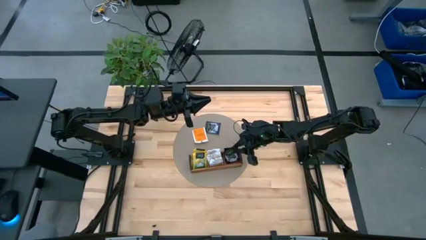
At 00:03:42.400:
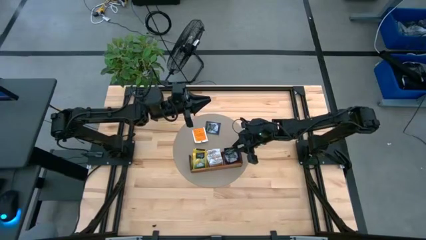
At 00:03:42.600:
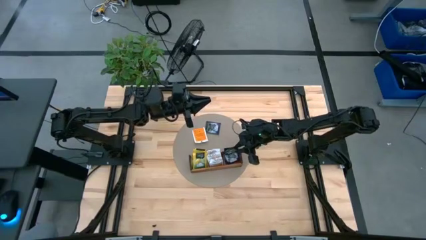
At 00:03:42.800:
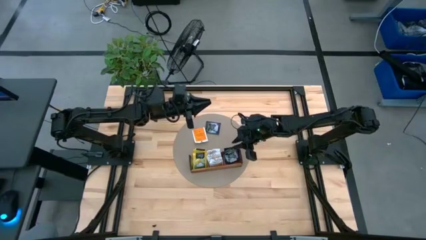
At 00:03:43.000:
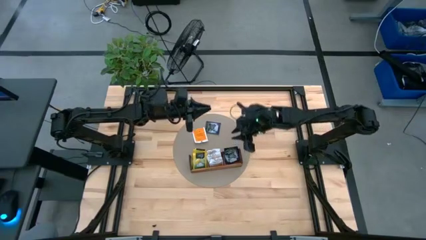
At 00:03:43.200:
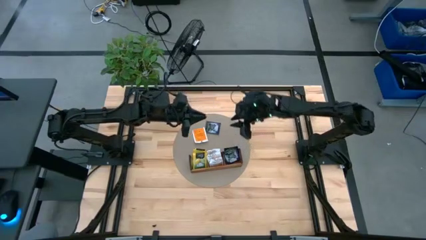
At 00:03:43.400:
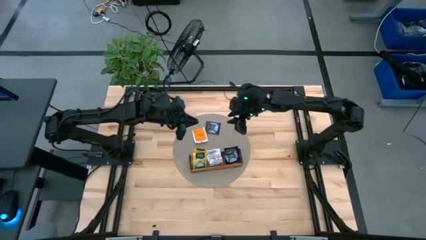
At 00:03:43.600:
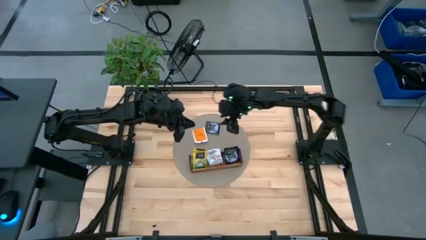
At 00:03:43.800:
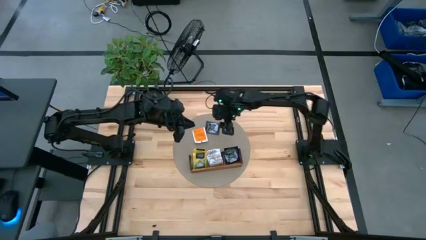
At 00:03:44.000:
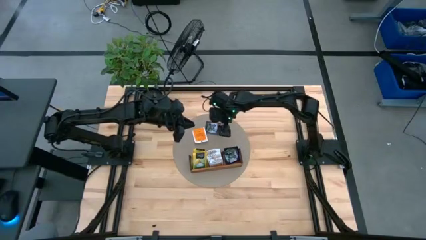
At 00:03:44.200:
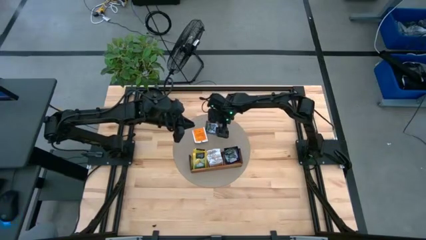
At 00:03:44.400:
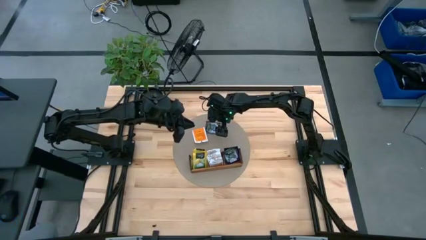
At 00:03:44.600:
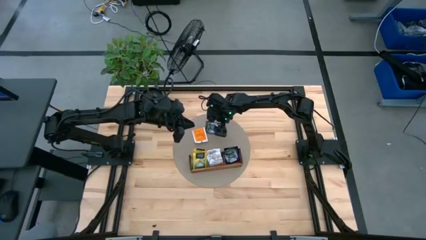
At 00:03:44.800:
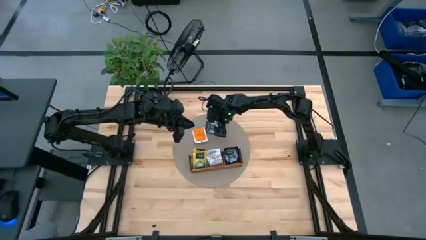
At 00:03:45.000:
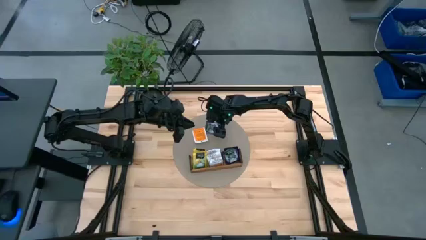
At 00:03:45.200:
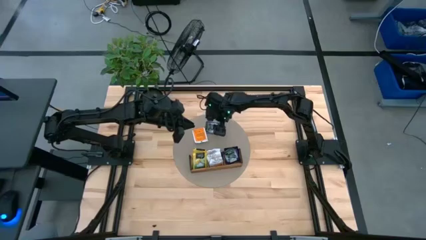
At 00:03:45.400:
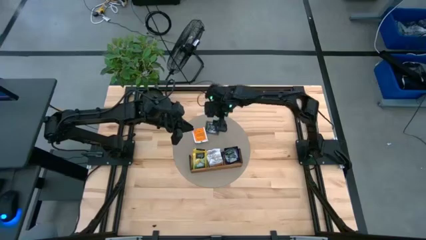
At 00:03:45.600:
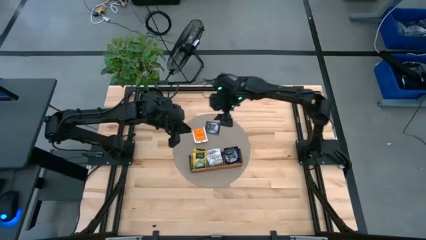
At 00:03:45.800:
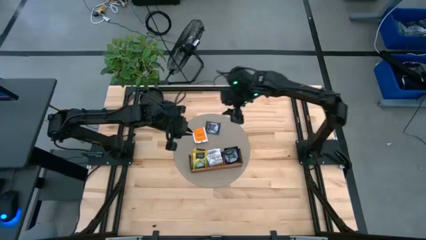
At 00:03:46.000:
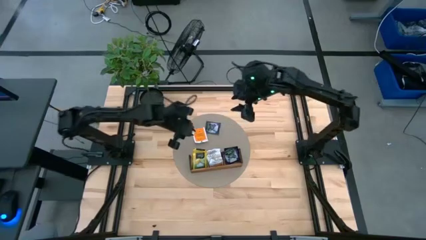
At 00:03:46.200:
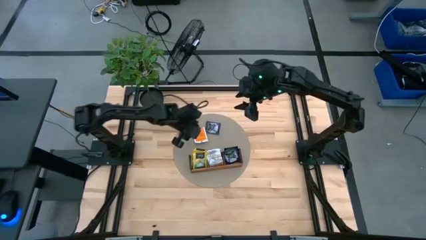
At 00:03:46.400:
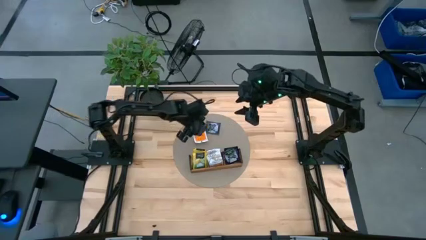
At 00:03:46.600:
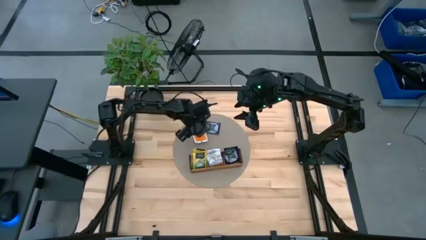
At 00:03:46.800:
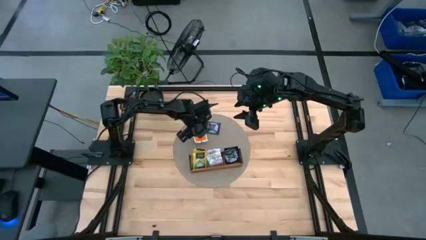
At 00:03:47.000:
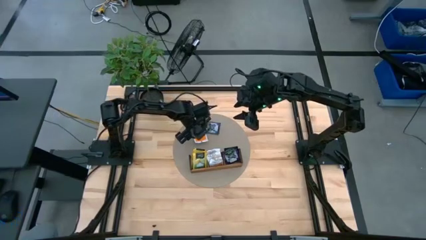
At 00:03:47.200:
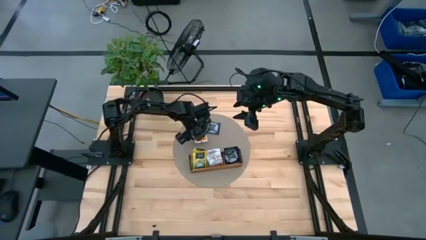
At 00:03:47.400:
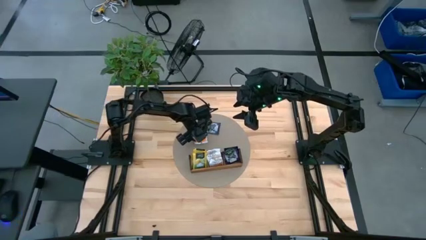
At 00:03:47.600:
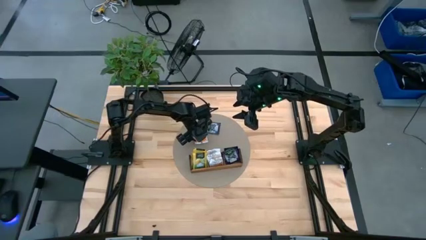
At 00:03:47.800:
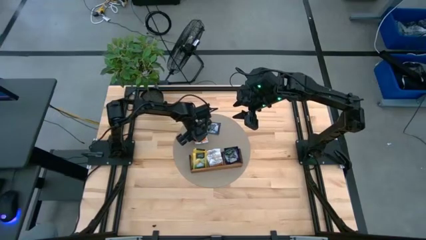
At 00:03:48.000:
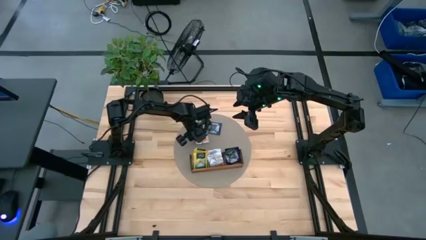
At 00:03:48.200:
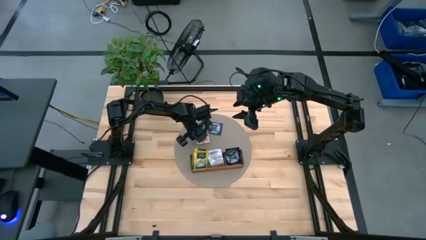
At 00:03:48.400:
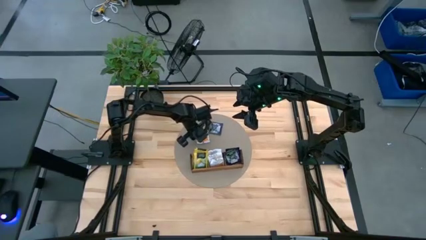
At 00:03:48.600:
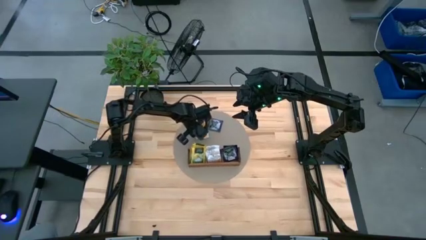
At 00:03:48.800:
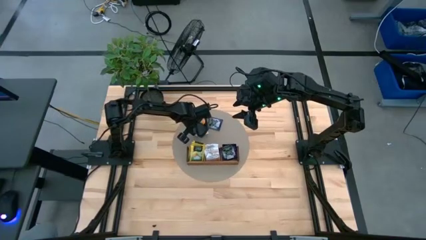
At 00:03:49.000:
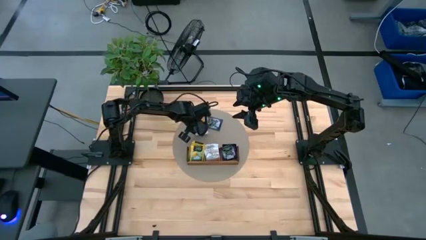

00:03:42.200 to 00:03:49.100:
Task: Pick & Place Tea
Put the orange tea bag into the middle section of the wooden organizer

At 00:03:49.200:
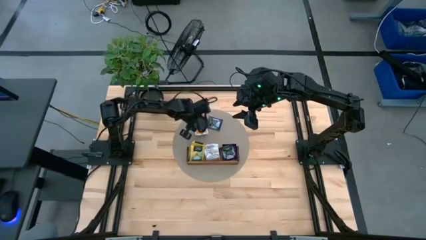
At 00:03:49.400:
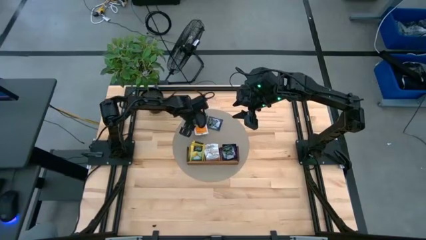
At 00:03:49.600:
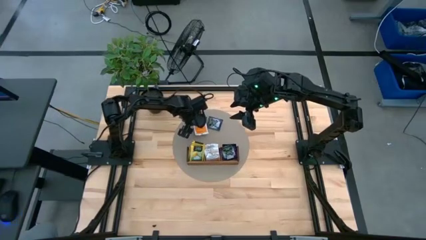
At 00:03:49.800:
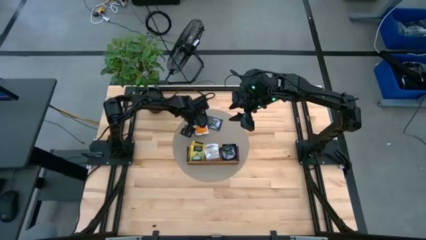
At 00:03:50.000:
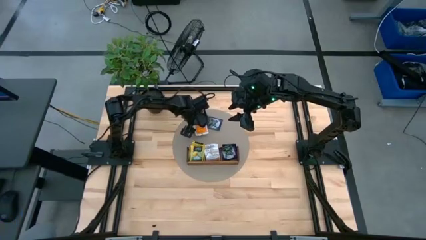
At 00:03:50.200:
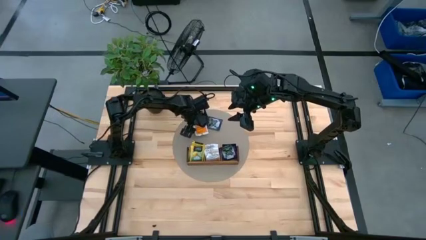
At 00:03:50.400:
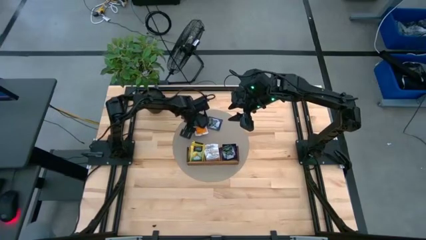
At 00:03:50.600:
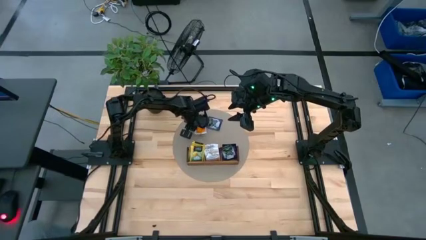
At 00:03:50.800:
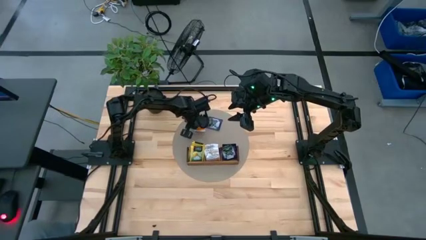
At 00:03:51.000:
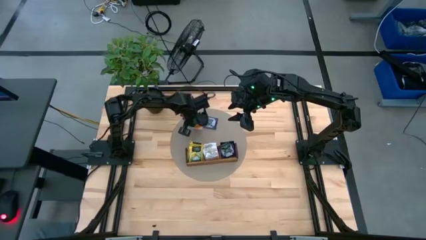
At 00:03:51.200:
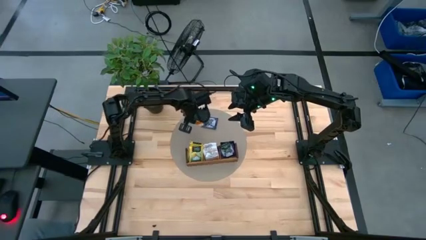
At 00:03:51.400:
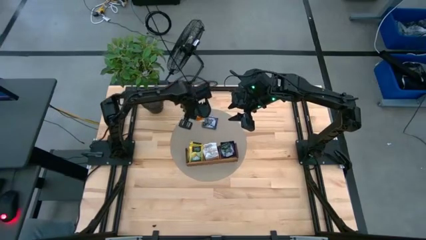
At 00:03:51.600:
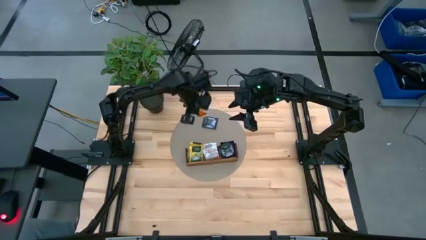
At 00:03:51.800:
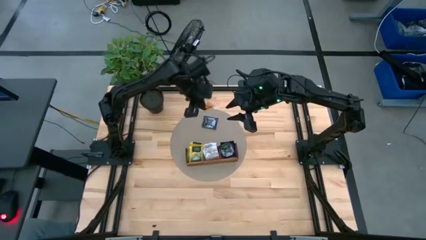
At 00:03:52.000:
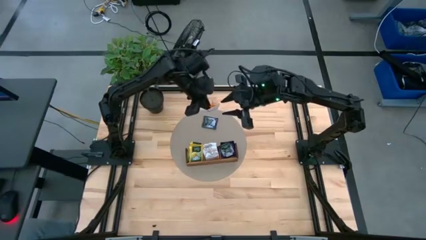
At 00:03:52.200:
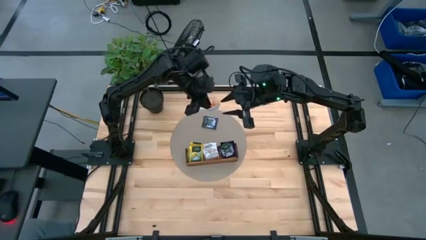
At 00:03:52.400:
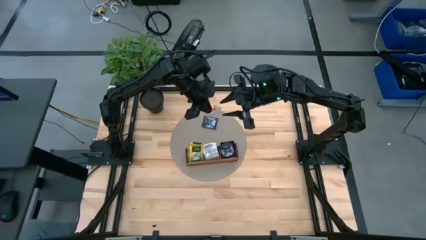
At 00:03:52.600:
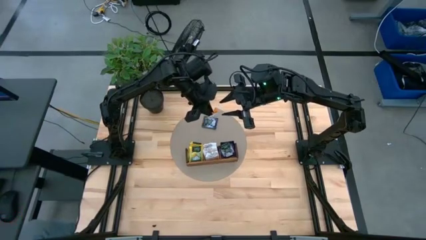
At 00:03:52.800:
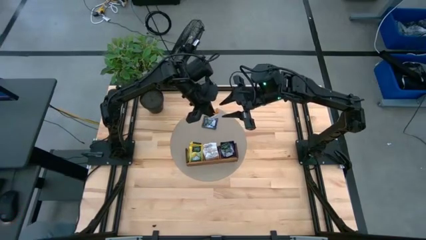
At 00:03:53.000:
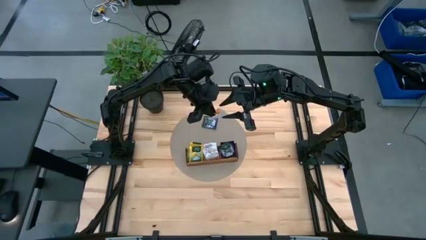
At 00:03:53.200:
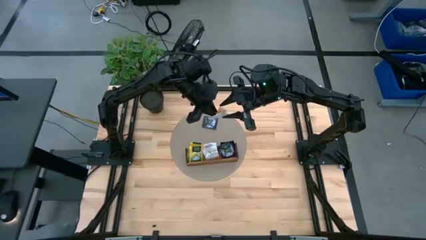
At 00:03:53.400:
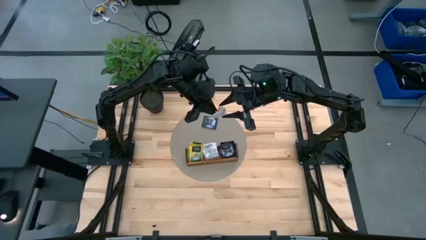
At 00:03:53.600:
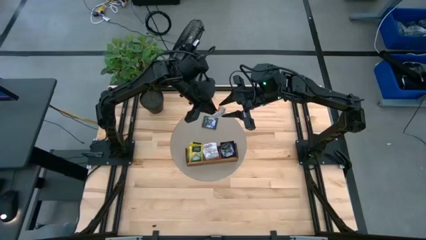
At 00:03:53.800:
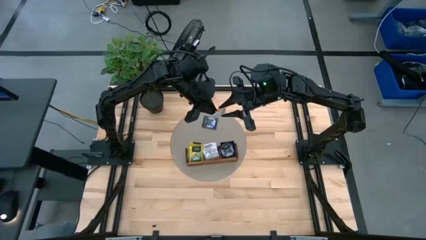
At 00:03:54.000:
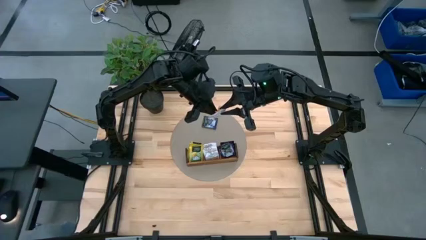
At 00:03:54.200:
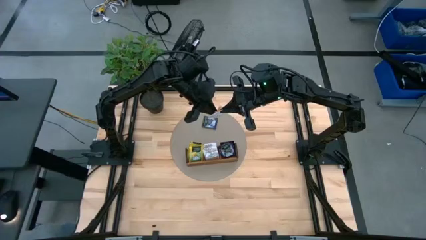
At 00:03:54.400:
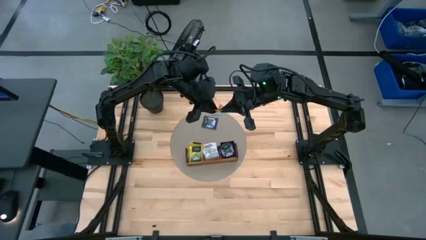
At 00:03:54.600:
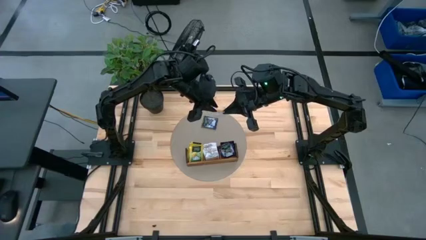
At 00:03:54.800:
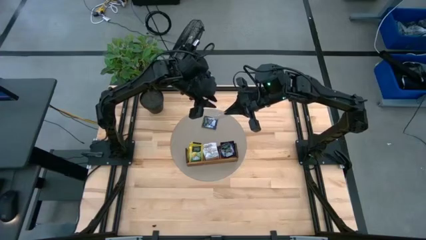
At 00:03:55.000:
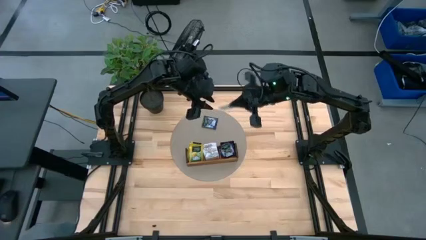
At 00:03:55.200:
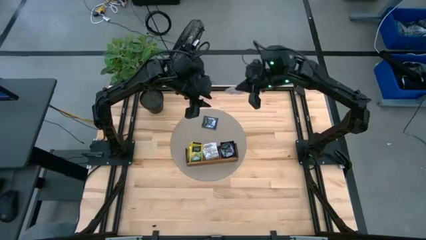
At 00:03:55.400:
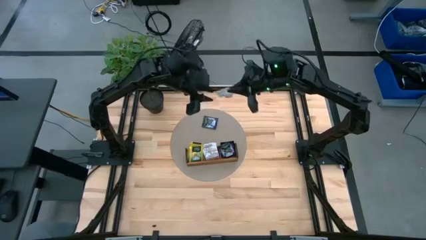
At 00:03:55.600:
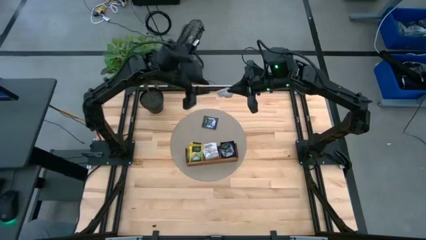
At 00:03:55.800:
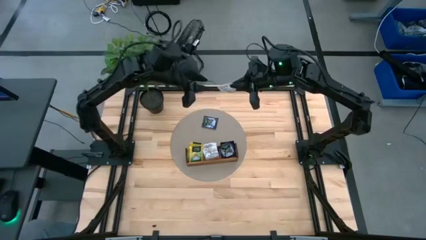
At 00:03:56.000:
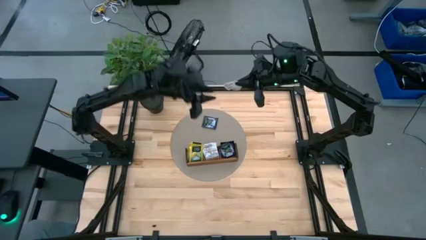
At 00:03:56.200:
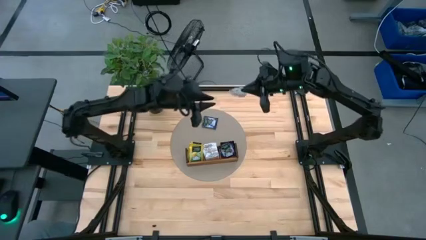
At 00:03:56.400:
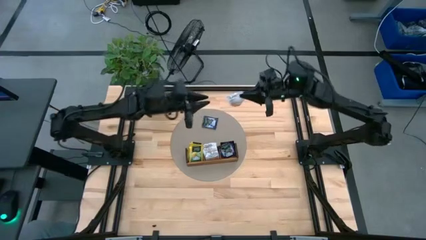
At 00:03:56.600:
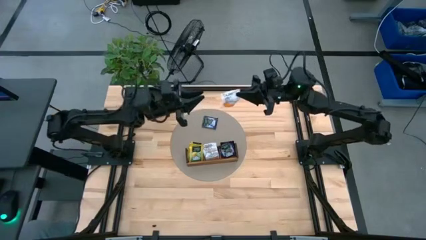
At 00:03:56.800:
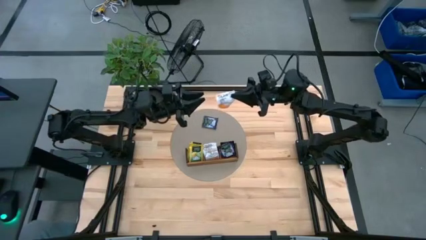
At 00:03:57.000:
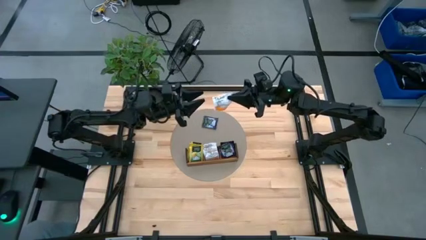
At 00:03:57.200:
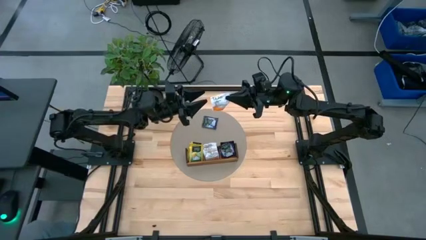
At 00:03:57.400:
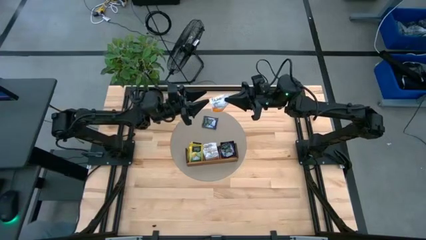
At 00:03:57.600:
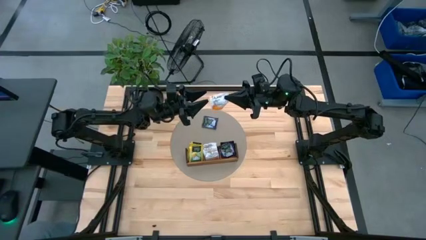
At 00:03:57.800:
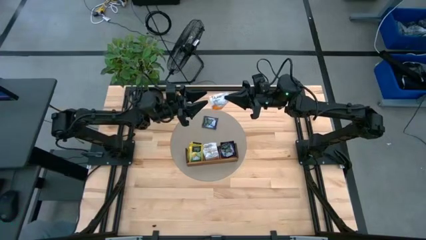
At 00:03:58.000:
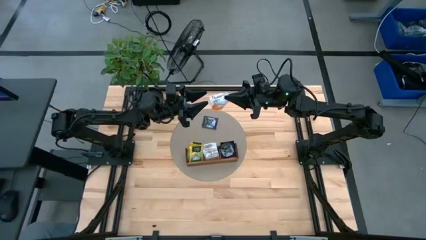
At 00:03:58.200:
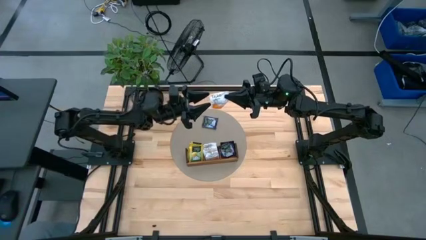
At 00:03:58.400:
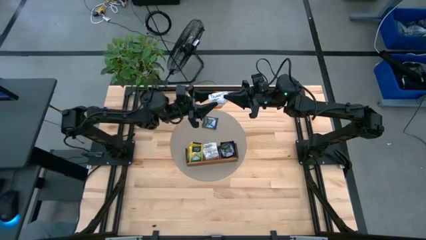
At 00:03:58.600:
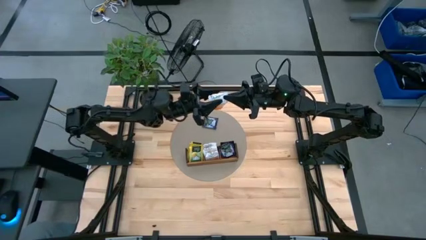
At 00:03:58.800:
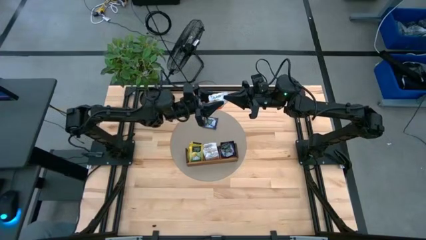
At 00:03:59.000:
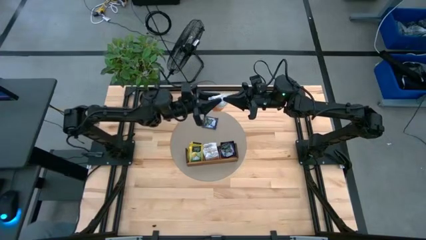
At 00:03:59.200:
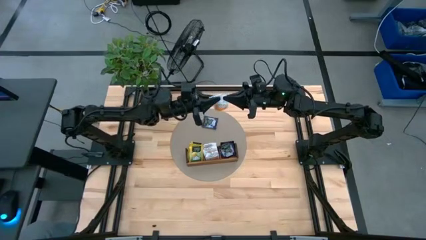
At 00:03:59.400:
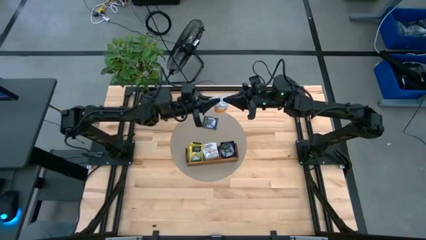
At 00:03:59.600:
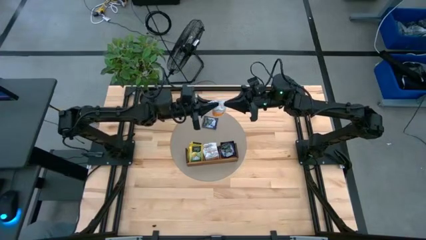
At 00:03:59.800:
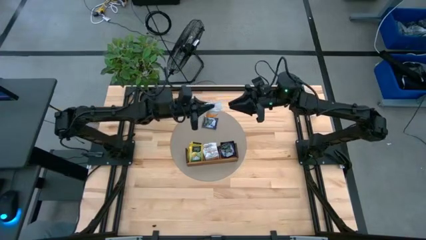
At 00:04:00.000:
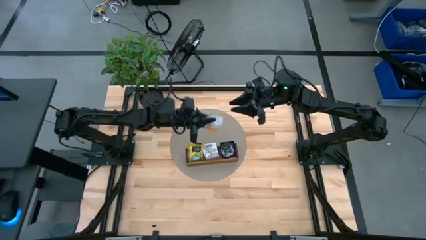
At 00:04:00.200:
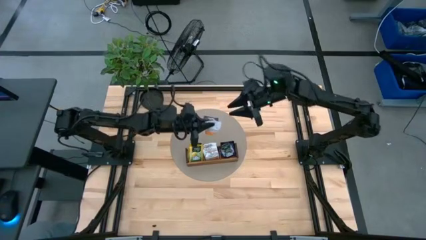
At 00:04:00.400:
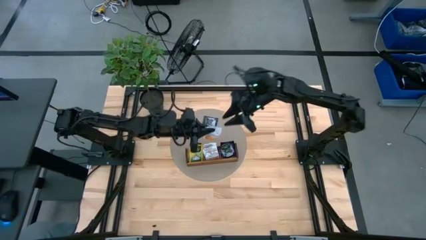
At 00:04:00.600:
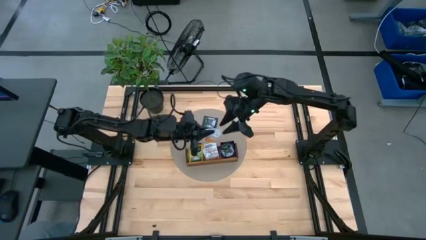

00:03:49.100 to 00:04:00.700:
Put the orange tea bag into the middle section of the wooden organizer
